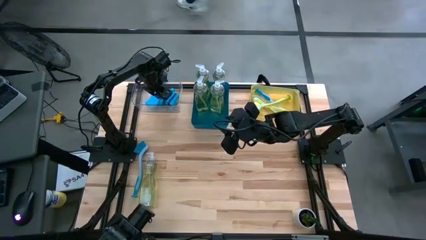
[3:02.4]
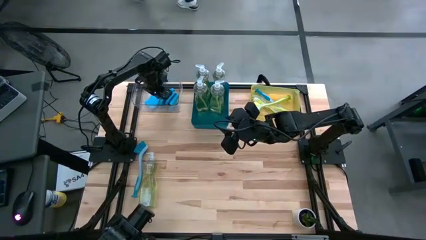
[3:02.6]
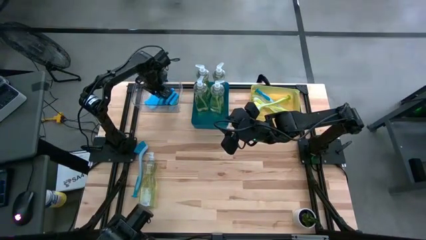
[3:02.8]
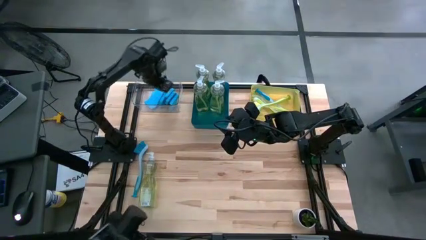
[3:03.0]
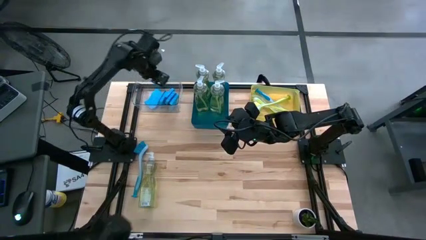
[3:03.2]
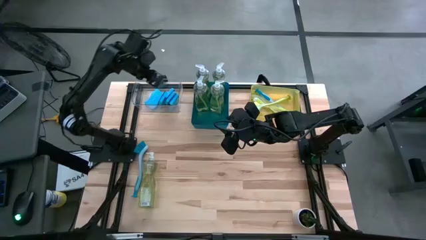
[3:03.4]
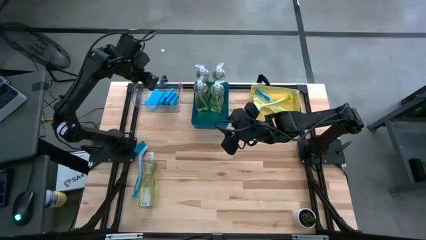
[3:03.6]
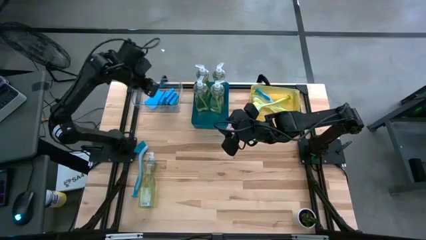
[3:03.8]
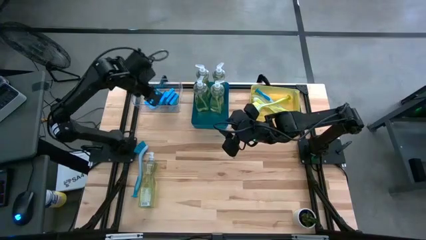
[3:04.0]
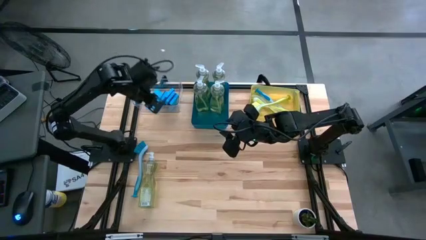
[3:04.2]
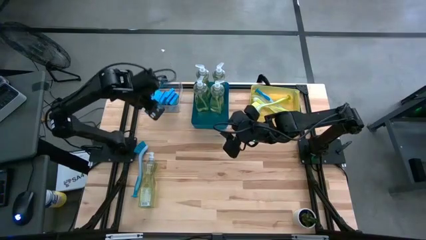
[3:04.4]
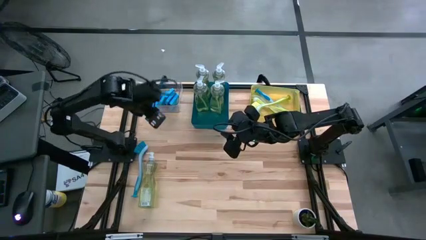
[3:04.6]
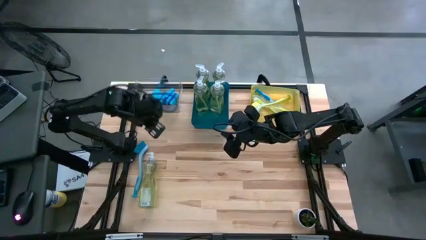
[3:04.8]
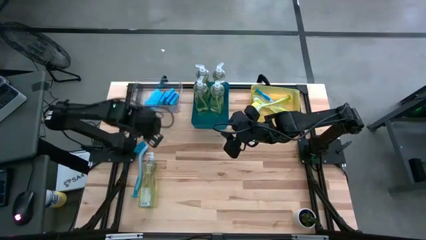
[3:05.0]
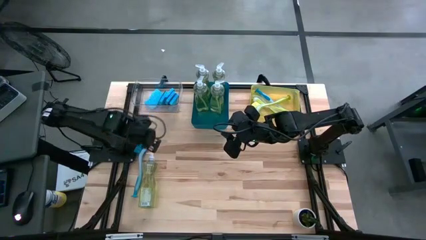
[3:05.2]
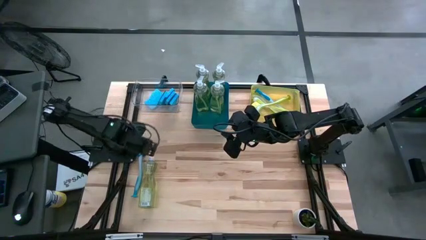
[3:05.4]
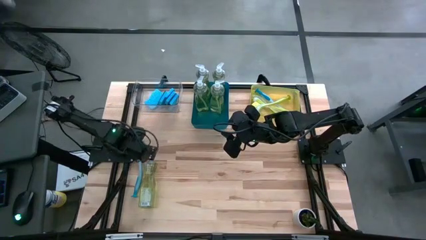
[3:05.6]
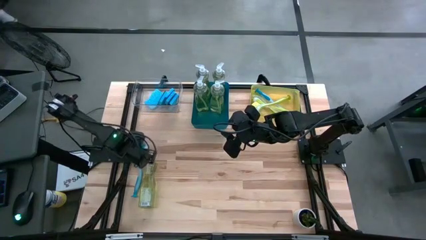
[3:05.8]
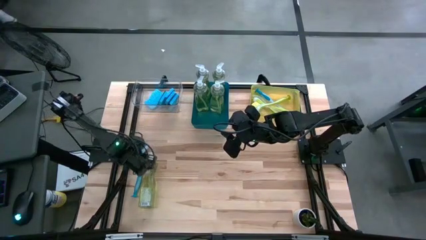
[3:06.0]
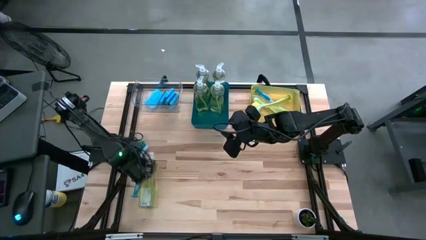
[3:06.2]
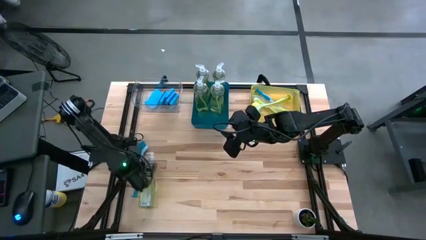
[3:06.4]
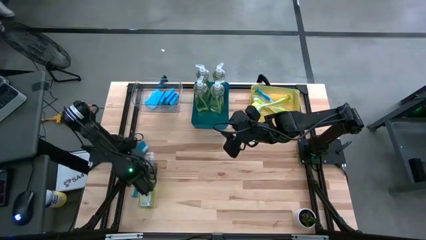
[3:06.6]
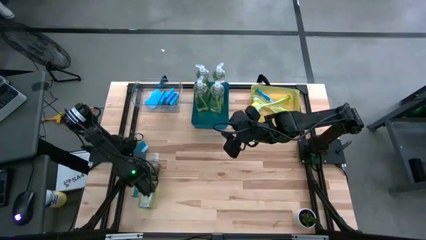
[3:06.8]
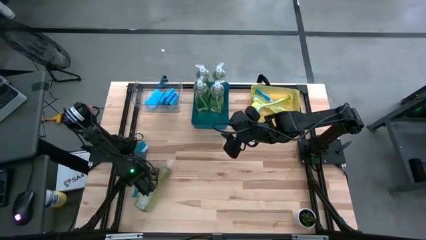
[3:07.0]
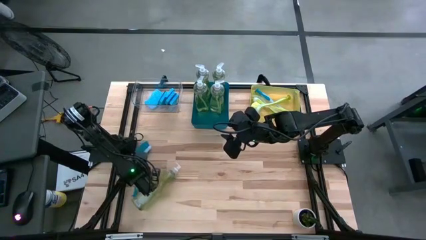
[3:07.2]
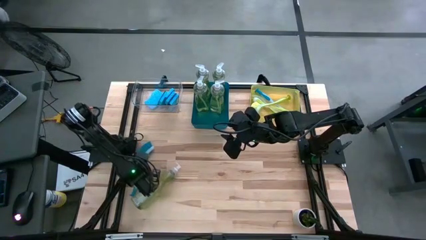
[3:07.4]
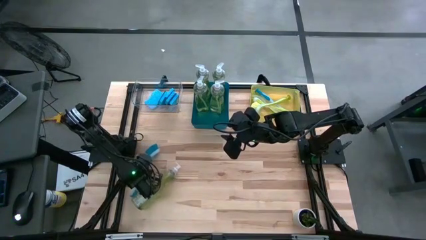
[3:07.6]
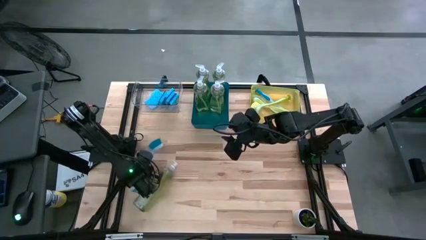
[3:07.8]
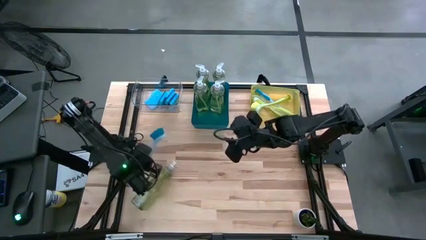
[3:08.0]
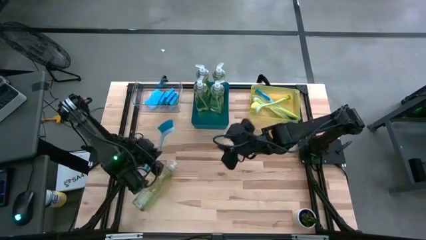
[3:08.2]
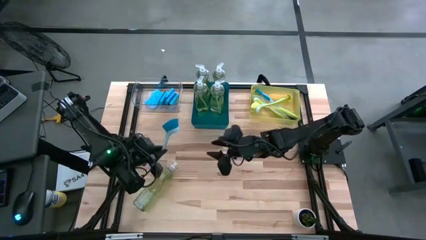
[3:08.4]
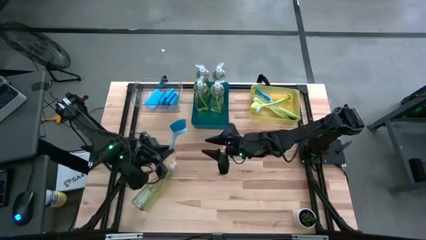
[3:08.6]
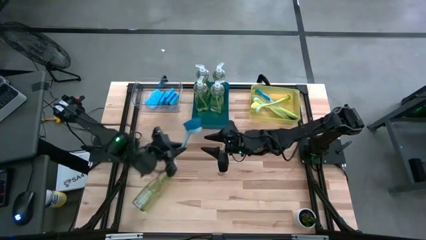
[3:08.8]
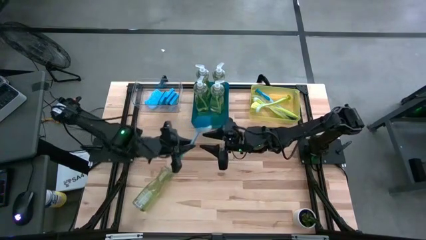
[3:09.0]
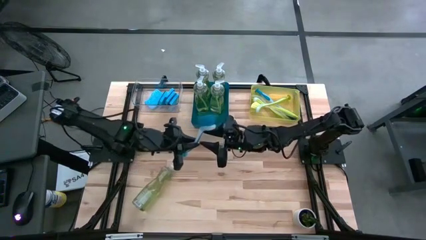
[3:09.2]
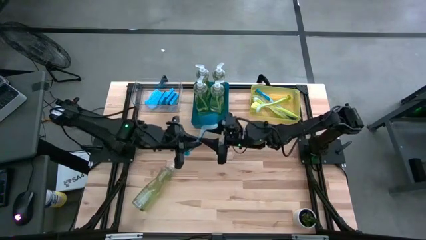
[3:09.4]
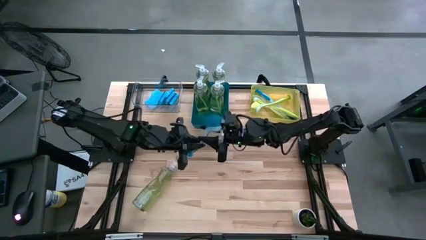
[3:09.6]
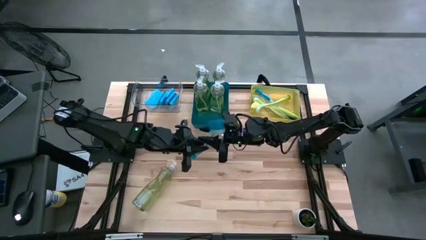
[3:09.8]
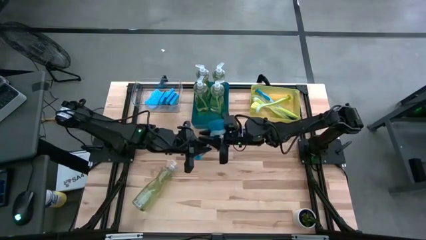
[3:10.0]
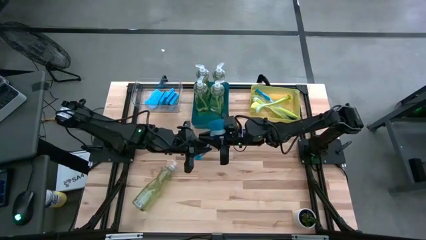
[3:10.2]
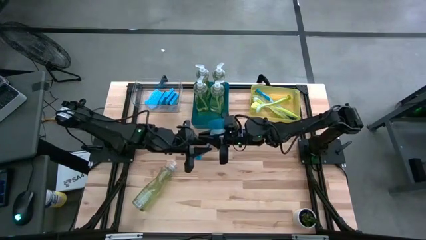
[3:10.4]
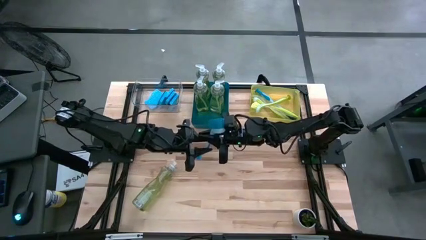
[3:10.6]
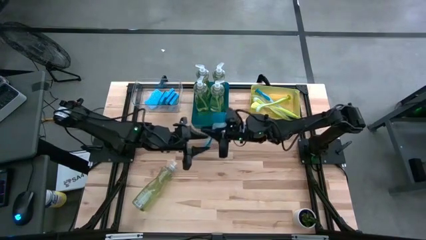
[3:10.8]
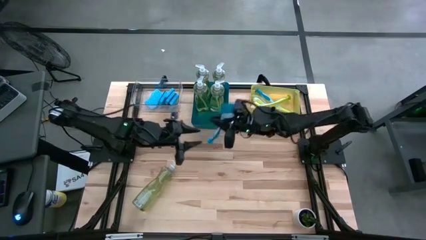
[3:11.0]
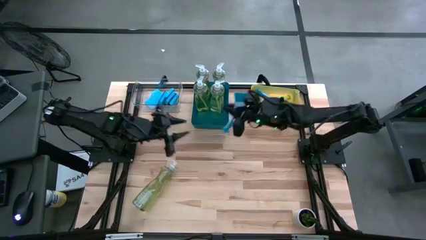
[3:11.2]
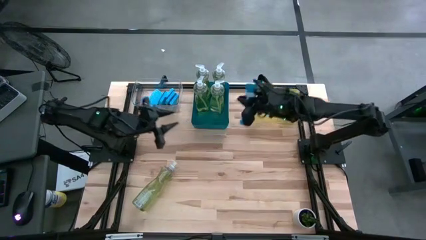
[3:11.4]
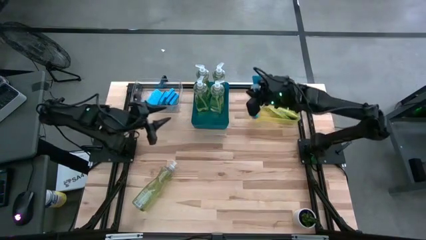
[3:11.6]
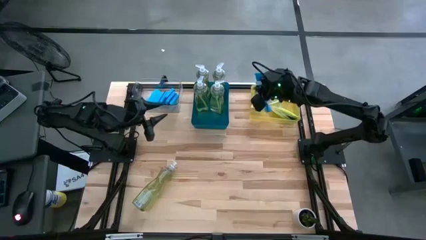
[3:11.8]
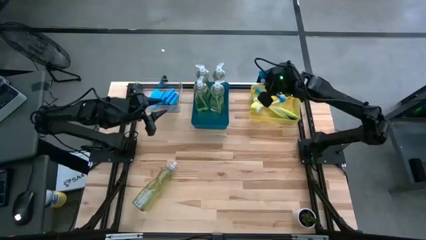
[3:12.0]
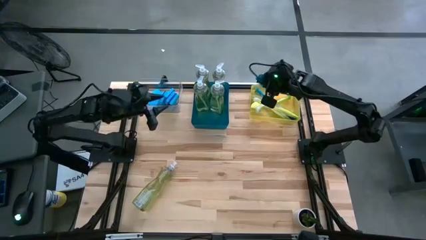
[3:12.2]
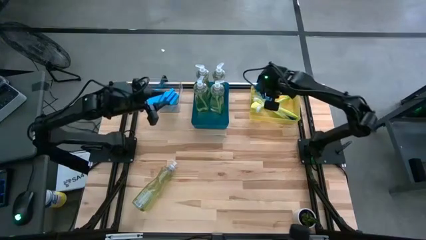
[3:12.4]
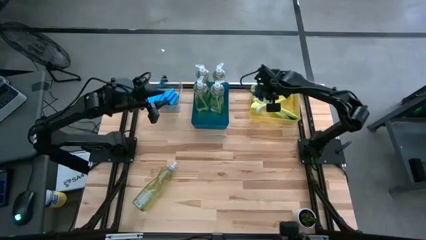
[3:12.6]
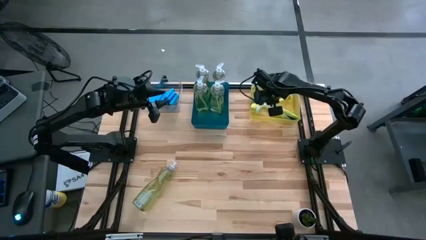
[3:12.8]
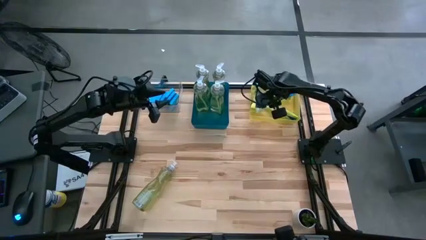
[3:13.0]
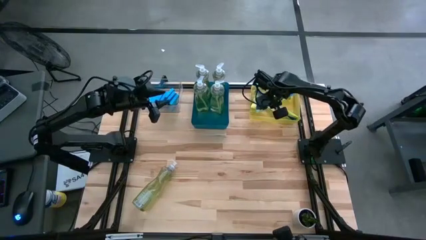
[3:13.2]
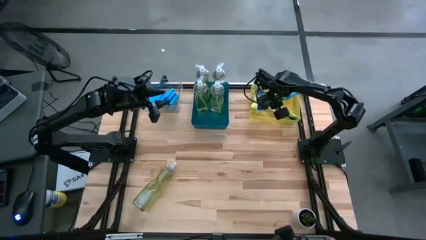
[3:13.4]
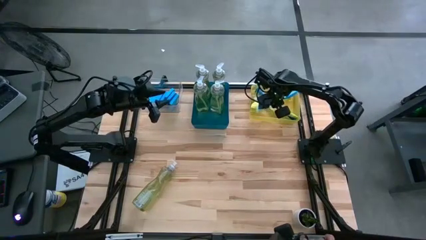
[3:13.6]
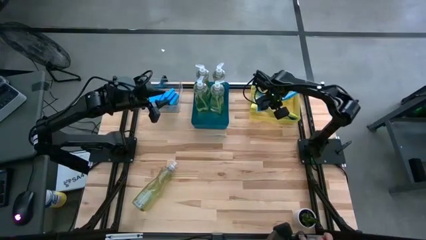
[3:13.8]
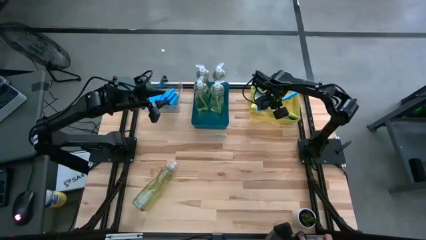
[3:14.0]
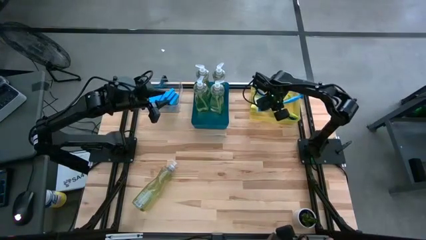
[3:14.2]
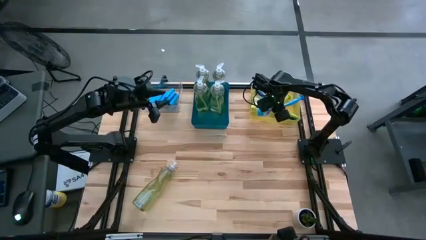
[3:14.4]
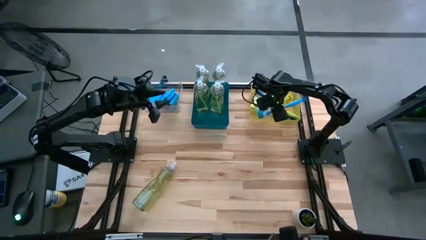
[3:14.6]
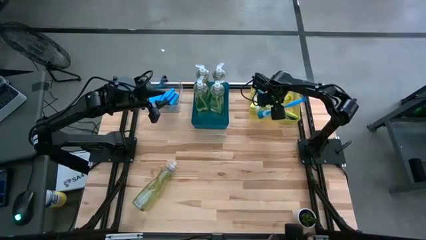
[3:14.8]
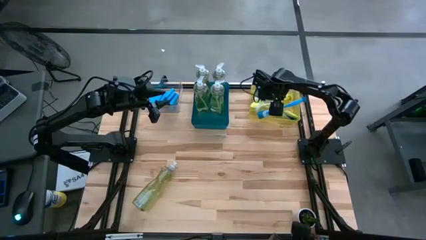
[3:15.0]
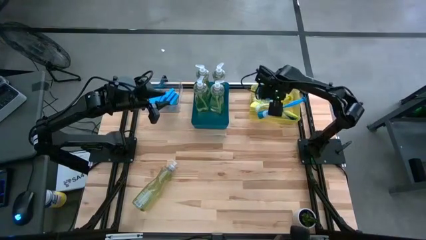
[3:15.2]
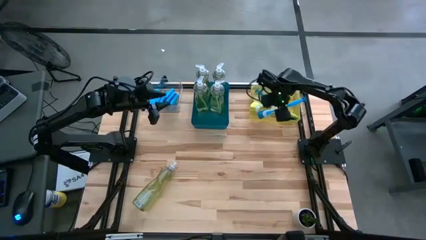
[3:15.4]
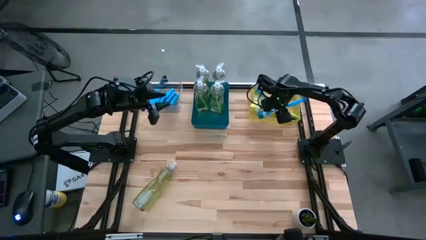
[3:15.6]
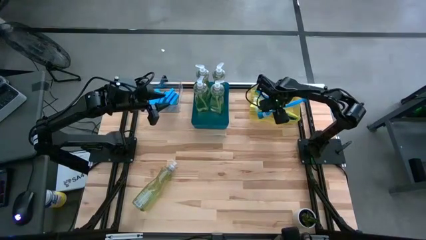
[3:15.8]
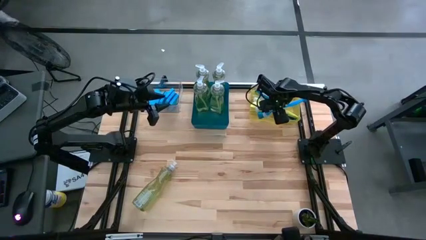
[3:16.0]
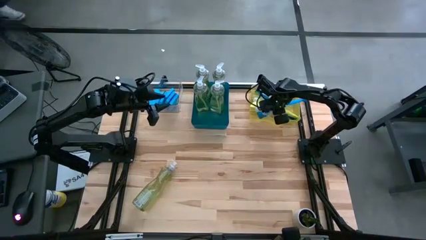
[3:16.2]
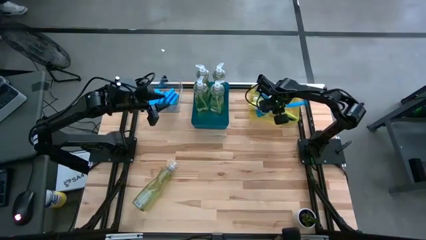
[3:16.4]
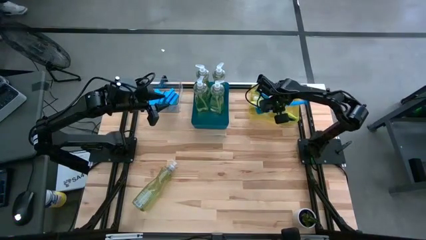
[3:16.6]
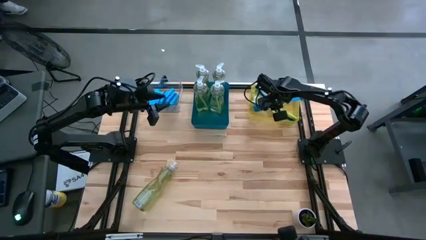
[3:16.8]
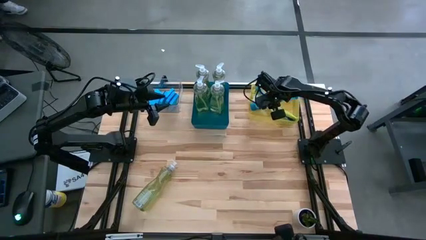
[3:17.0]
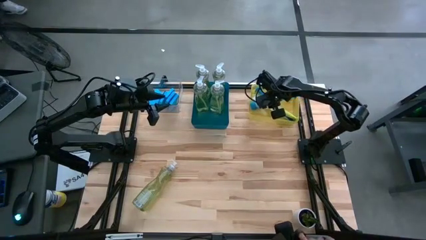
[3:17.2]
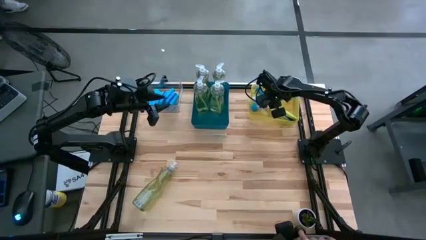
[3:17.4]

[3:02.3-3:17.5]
Task: Pick & Place Kitchen Sink Supplies
Put the blue dish brush into the yellow bin
